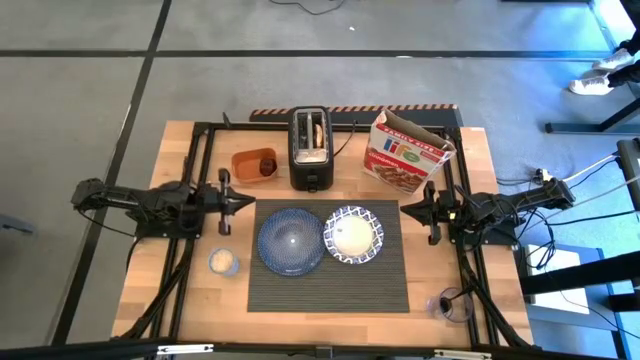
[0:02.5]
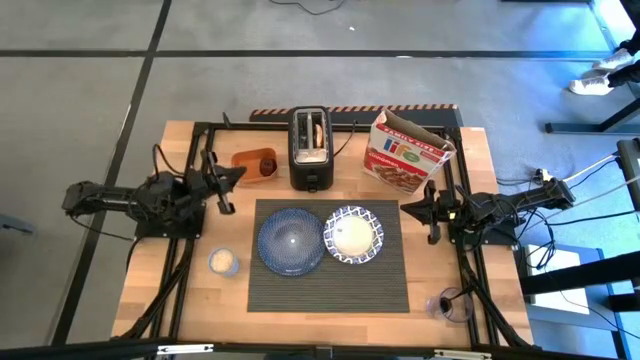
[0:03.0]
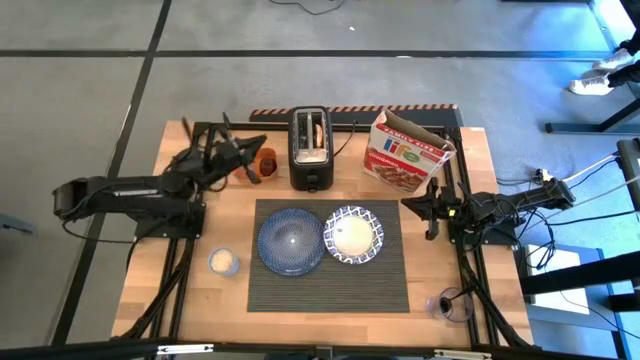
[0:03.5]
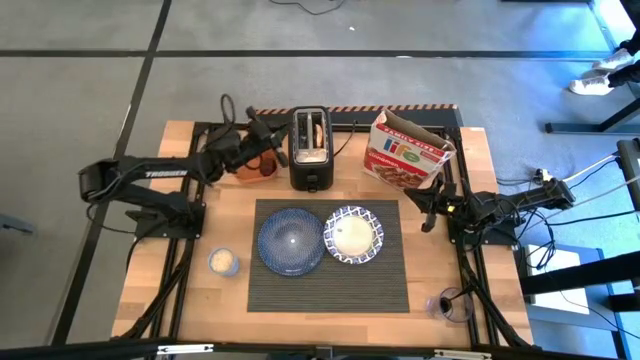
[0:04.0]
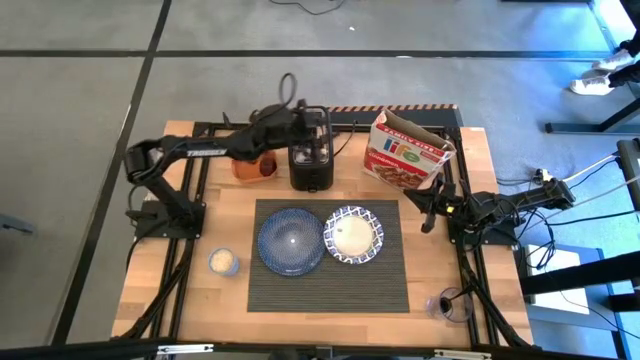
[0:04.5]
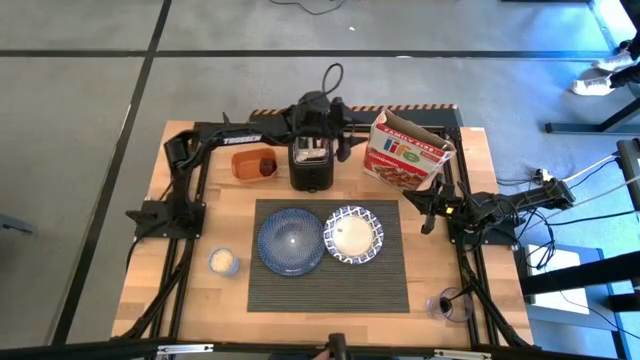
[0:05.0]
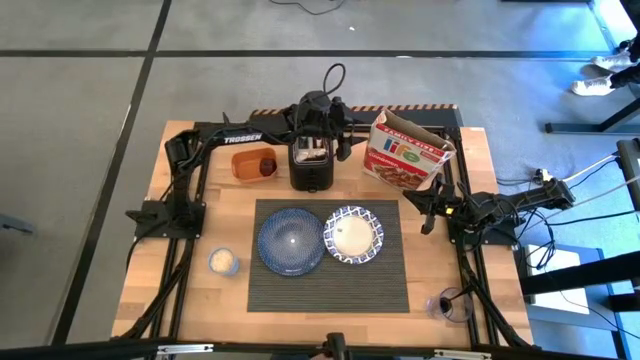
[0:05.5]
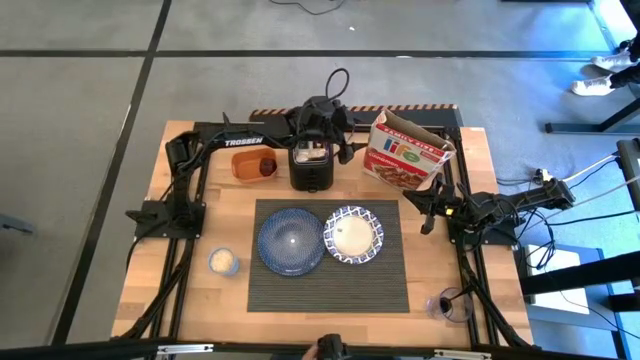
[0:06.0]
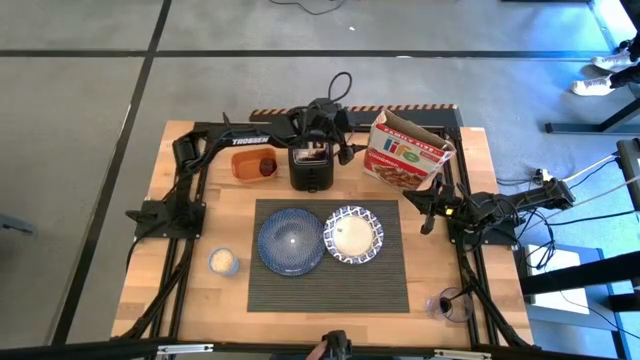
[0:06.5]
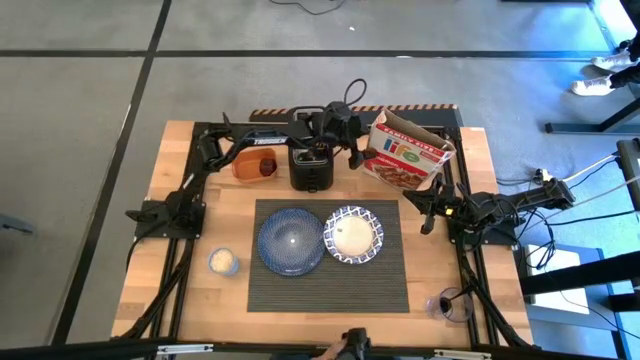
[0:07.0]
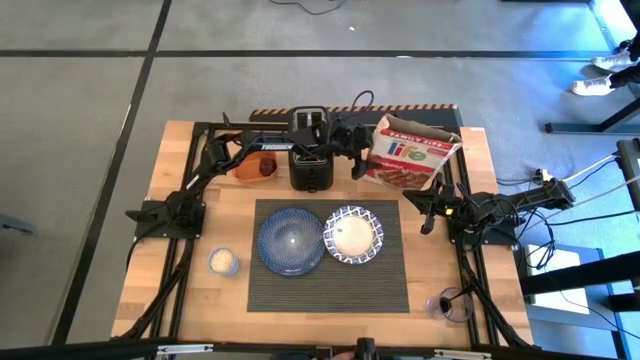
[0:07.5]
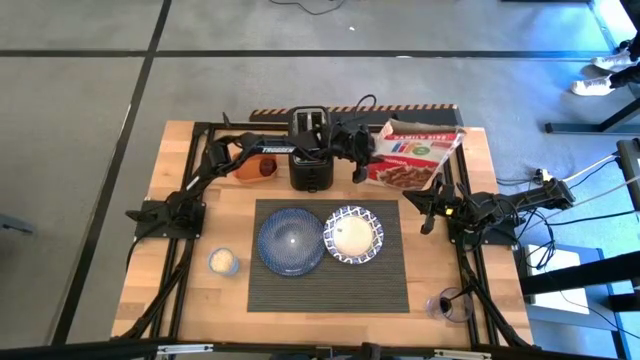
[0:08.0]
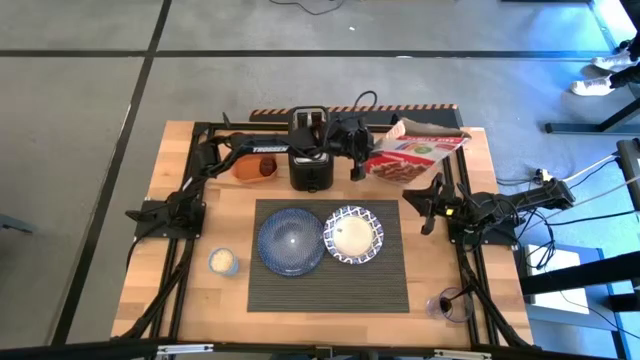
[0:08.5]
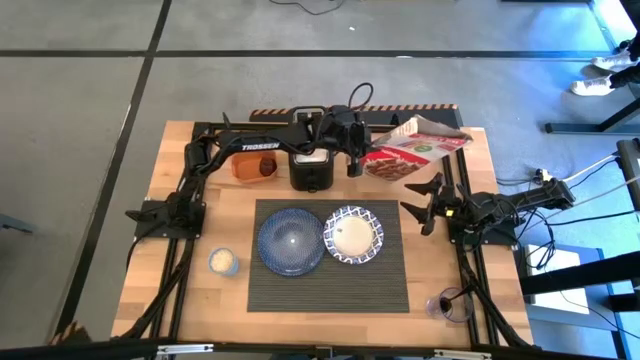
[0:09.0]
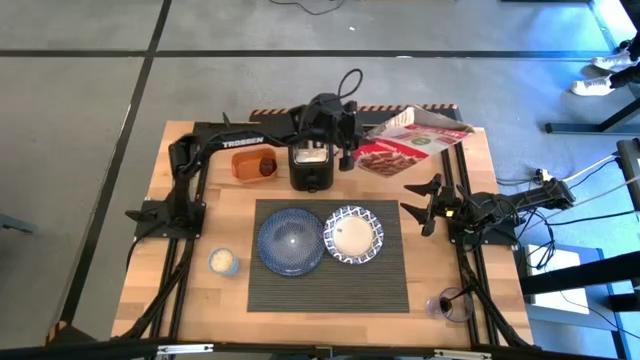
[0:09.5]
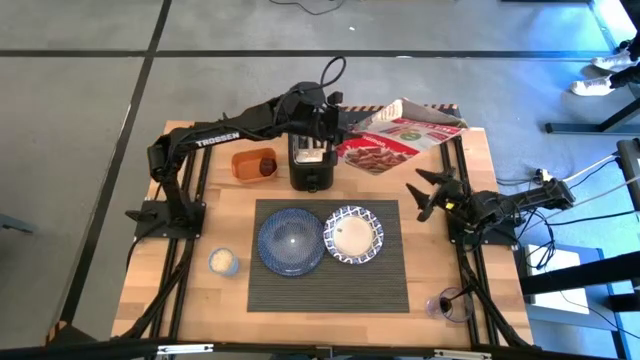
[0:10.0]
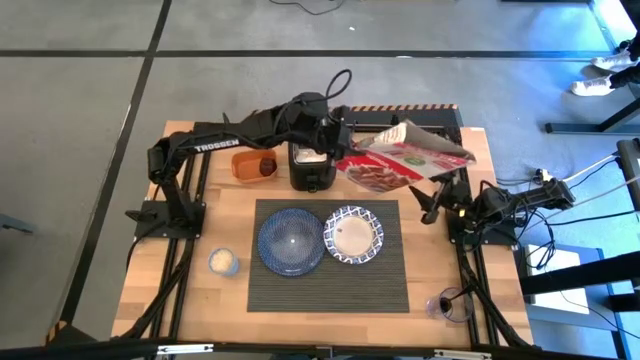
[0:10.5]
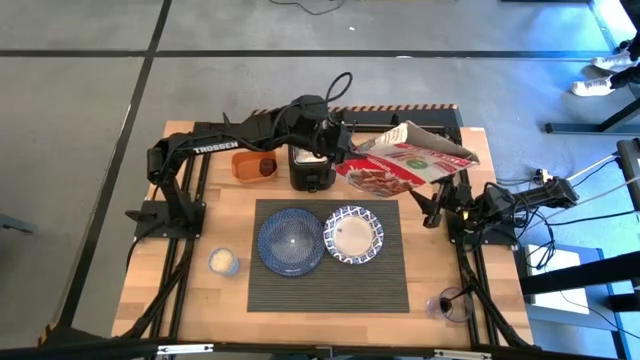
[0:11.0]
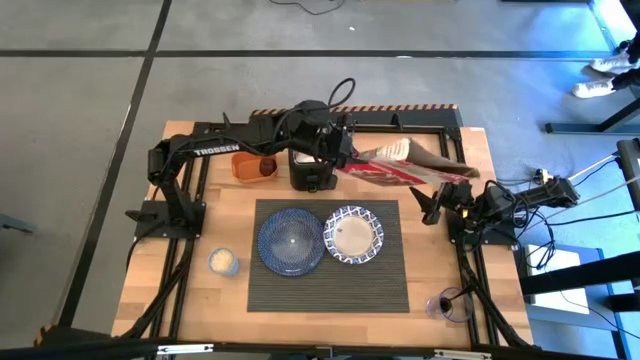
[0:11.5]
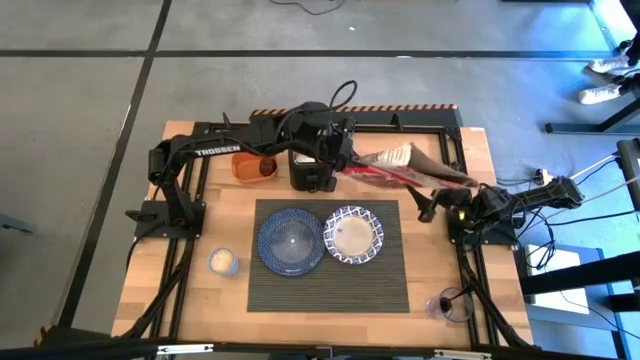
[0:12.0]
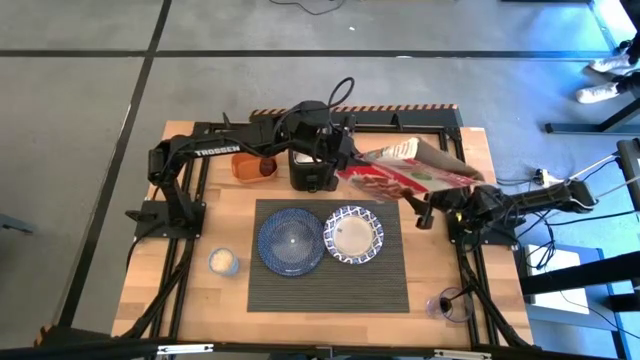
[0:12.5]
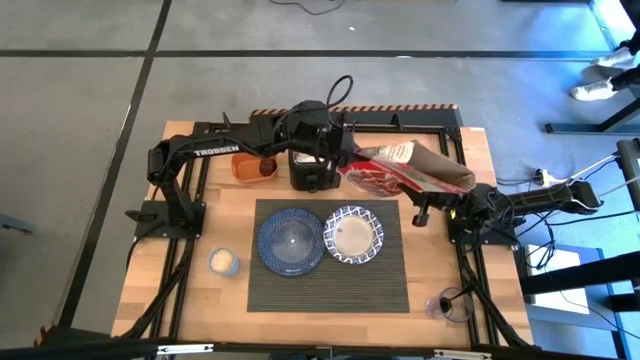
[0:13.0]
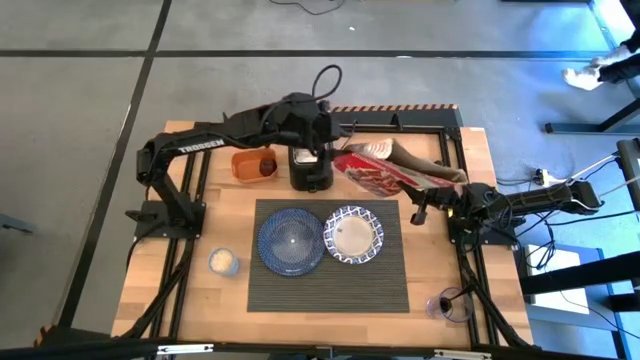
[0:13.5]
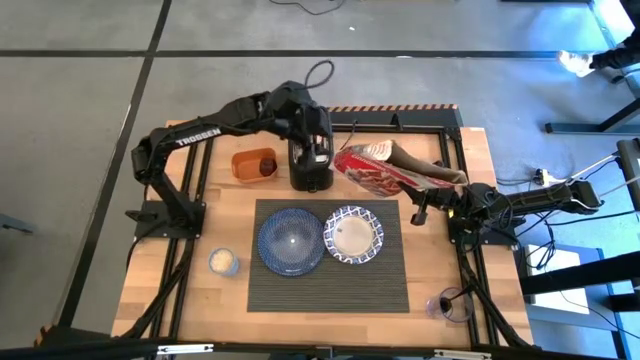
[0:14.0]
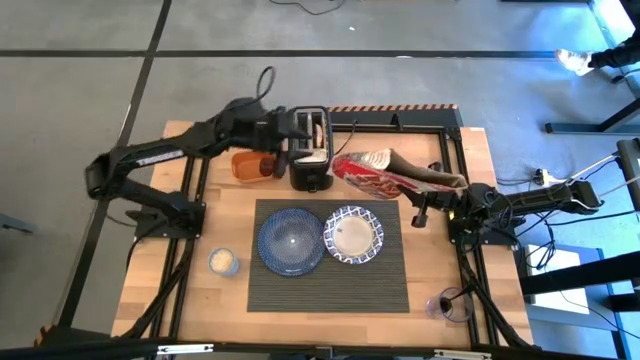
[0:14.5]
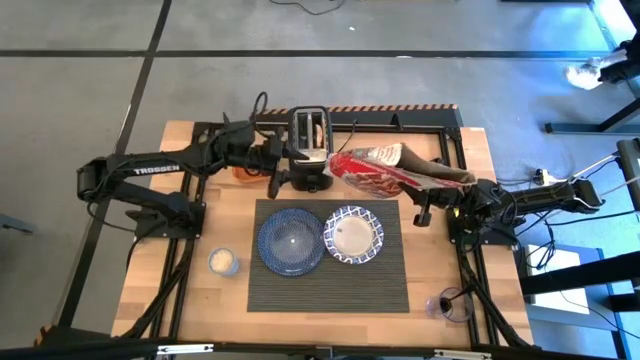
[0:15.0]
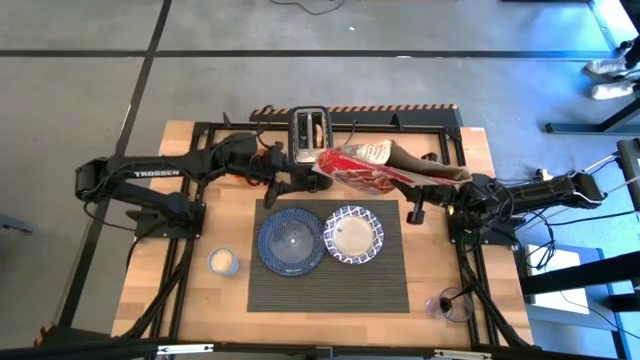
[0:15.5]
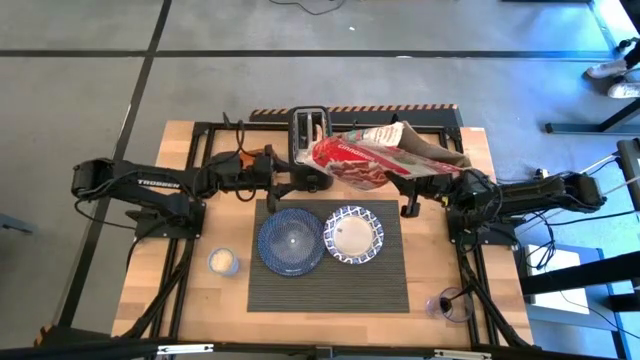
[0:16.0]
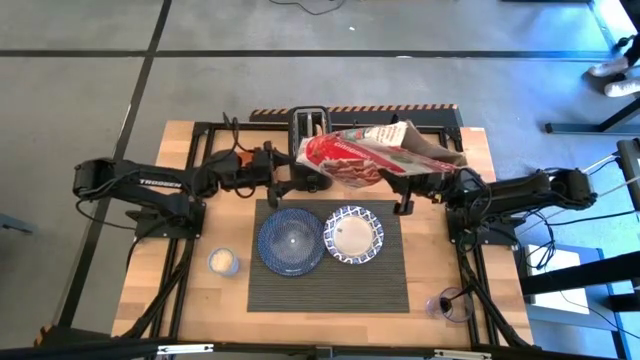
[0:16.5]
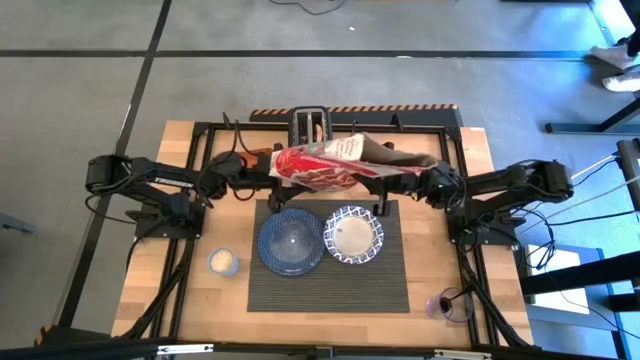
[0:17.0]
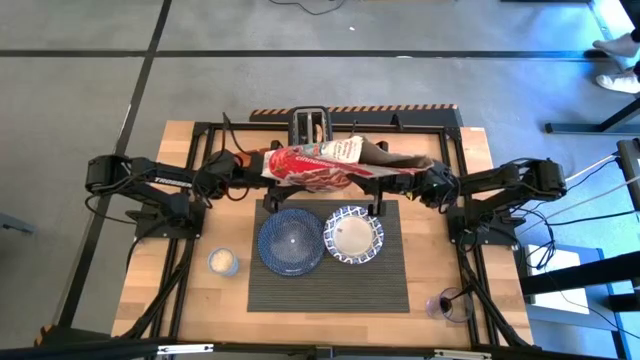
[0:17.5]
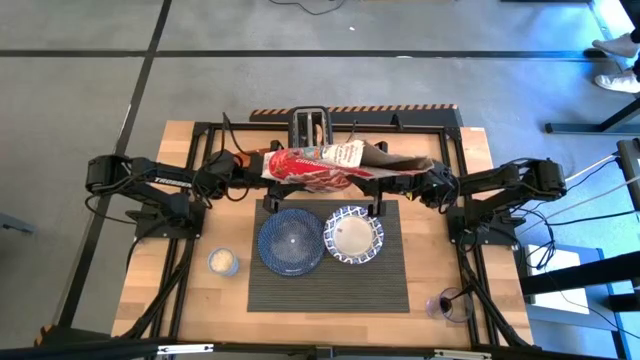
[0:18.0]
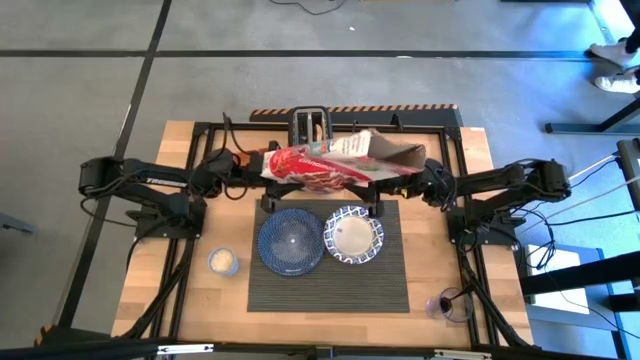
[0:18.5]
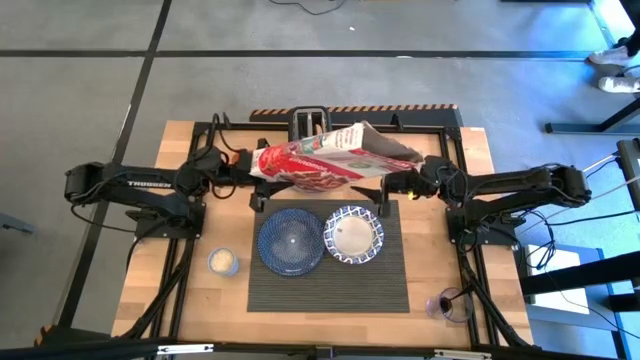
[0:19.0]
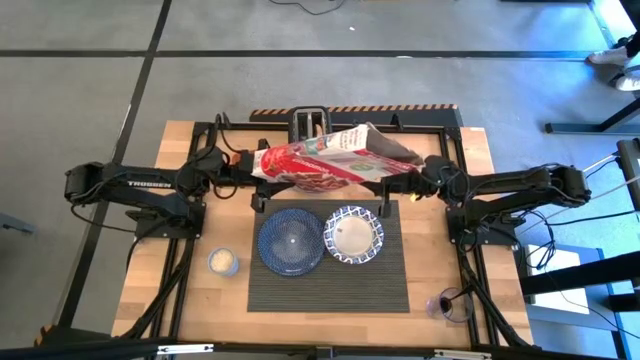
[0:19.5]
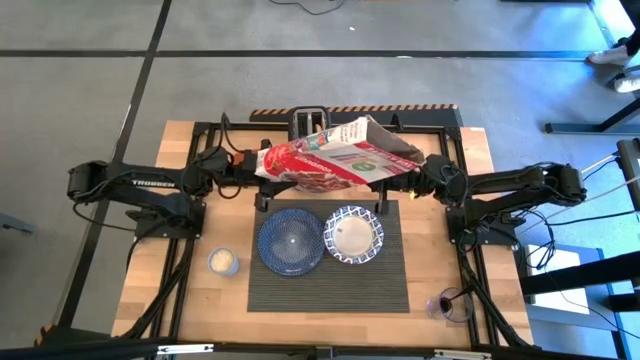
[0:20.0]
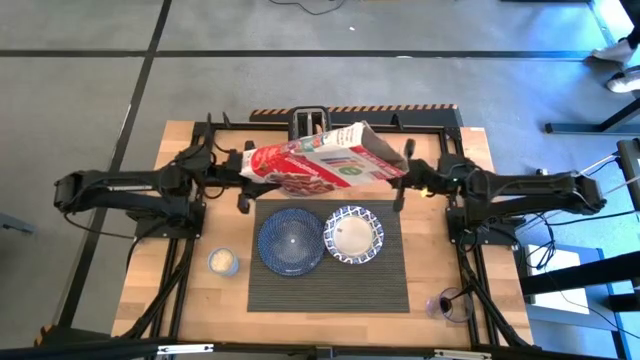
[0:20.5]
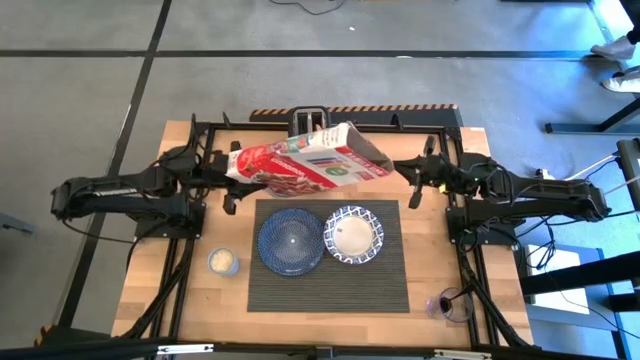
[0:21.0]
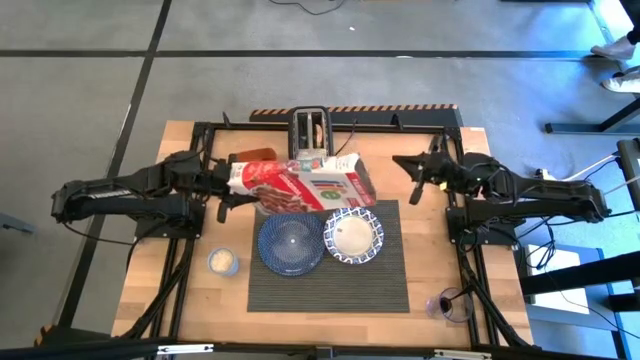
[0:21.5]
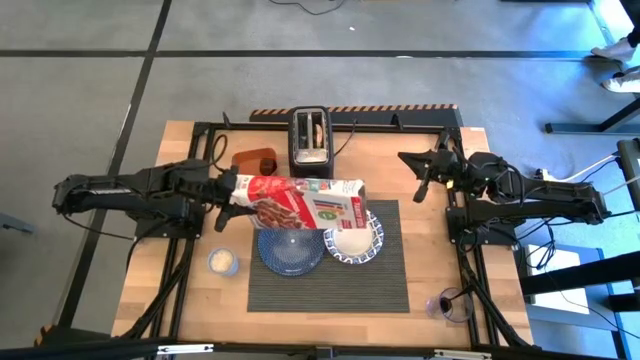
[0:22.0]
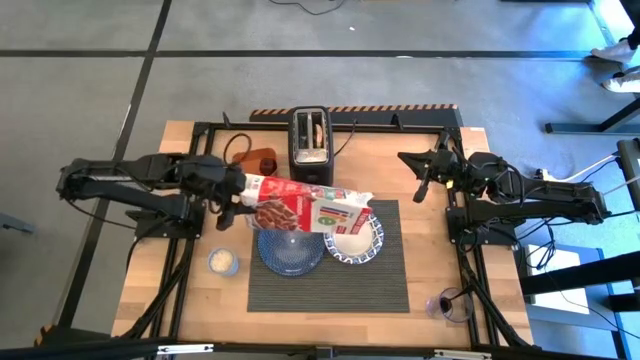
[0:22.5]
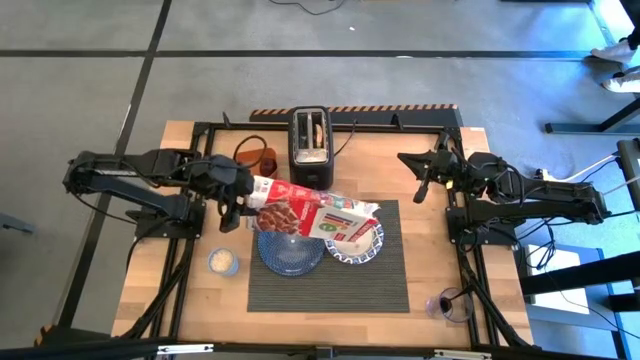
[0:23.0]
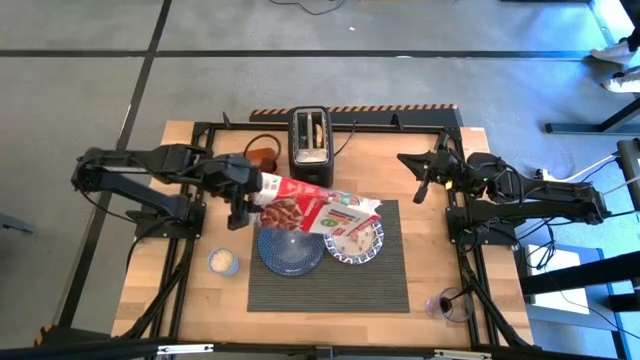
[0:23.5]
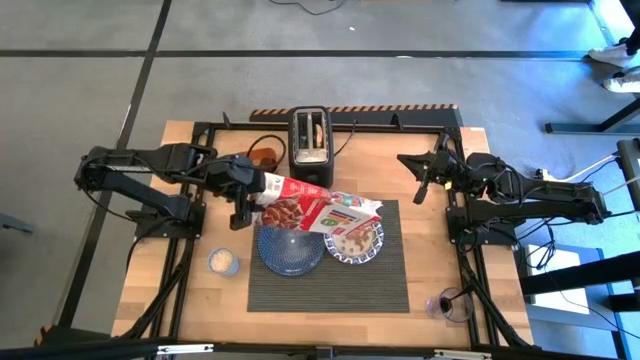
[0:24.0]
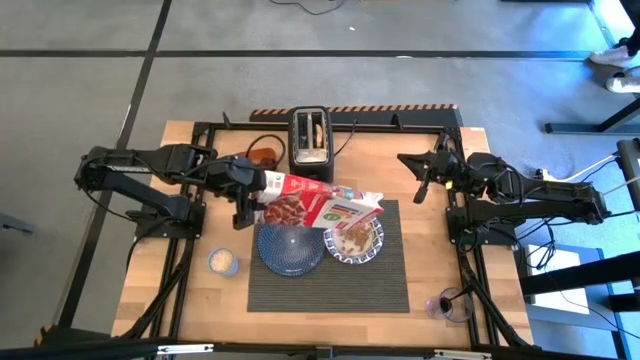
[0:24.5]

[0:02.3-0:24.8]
Task: Arrange a breakfast setting
Pour the cereal into the blue patterned bowl from the cereal box
